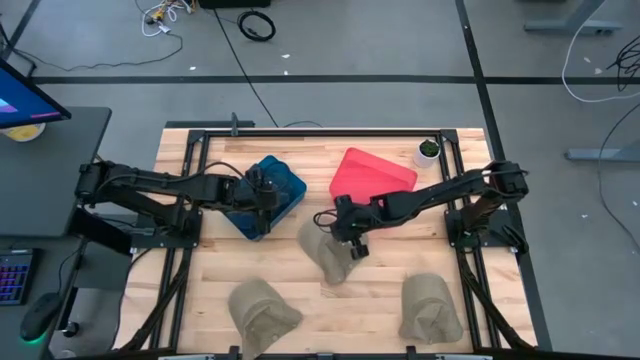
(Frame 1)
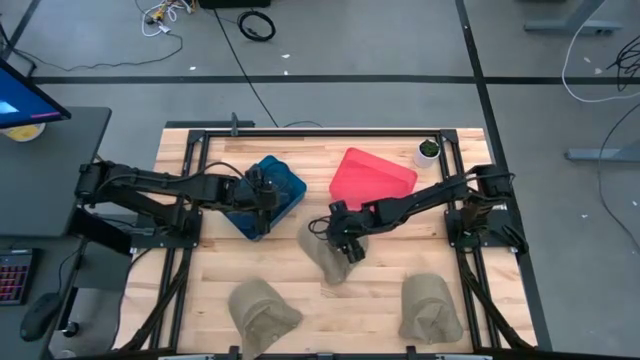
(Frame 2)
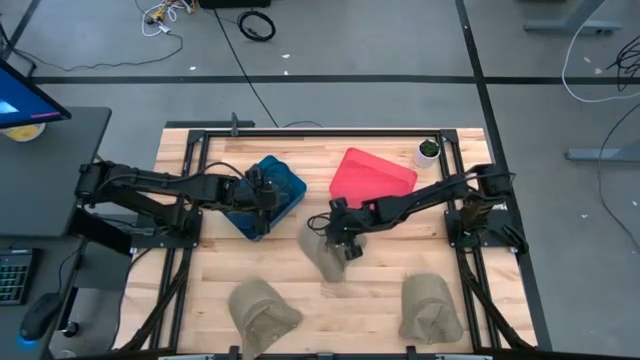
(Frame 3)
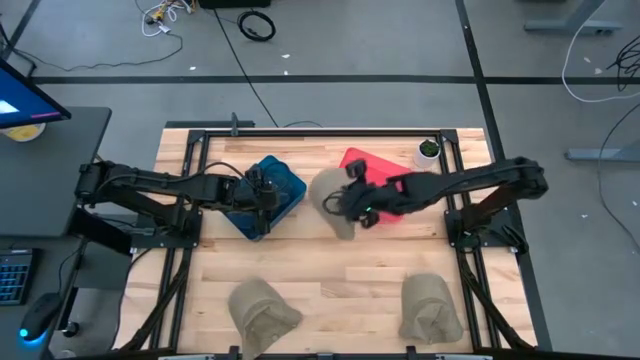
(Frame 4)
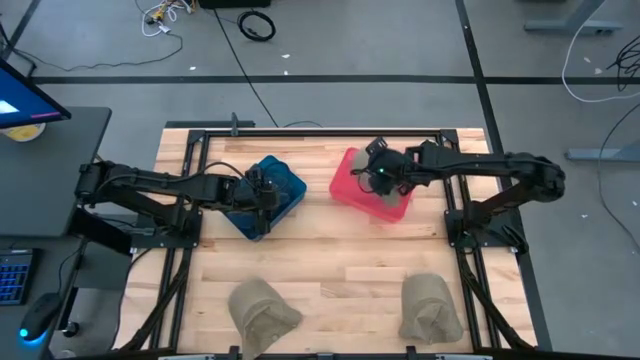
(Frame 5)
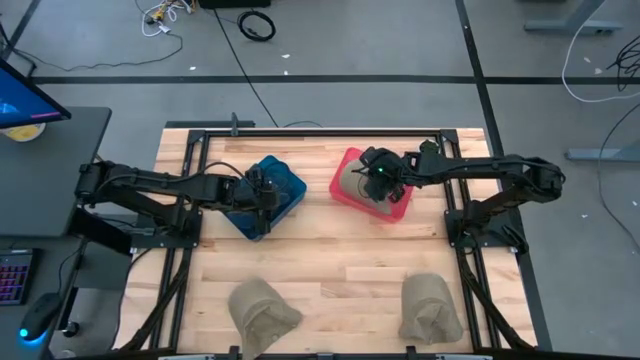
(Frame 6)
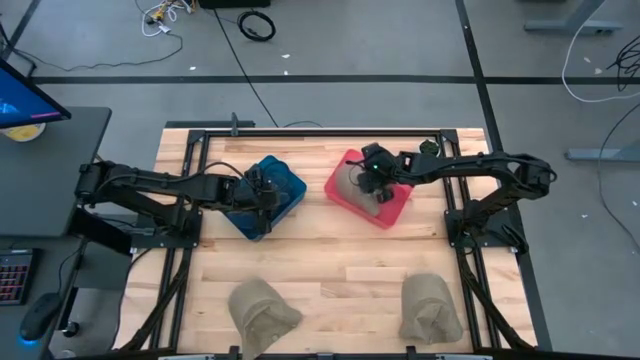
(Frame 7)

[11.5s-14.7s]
Task: Pick & Place hat
Put the top brown cap into the pink bin

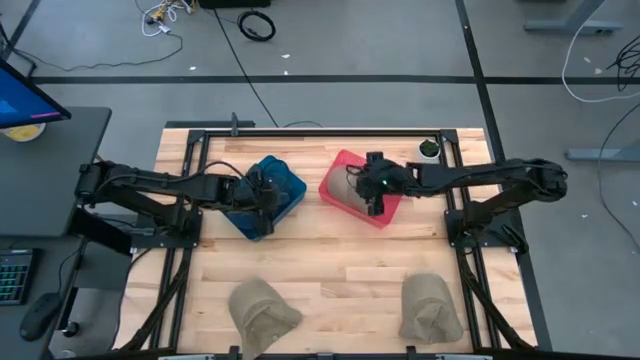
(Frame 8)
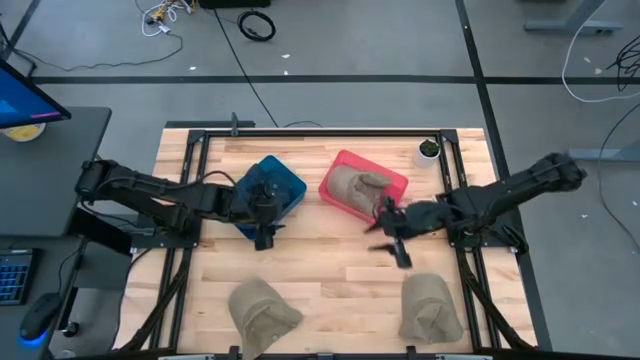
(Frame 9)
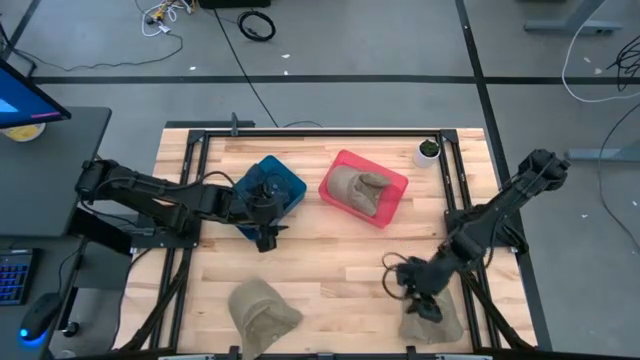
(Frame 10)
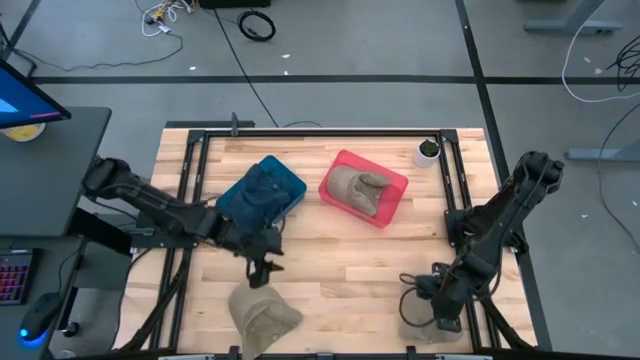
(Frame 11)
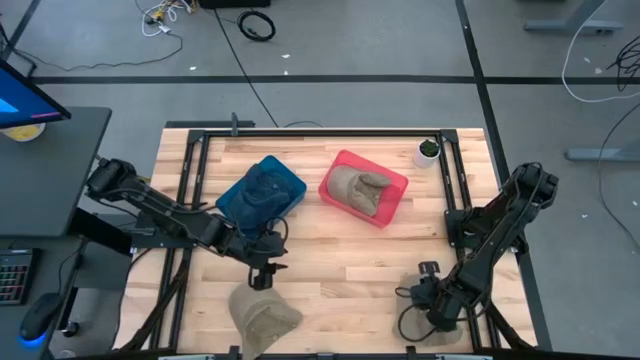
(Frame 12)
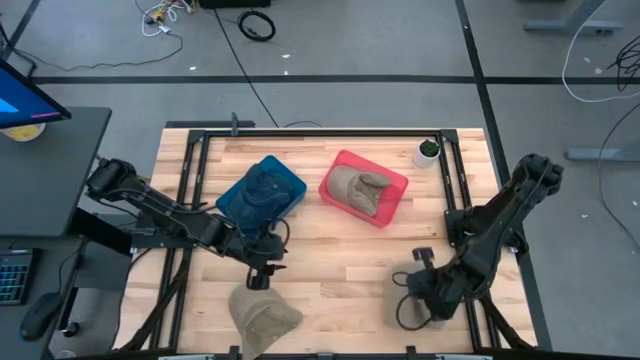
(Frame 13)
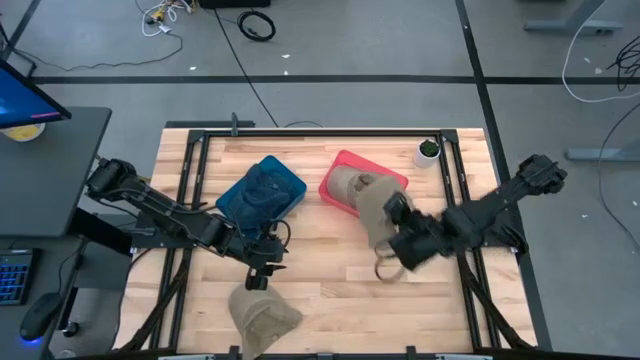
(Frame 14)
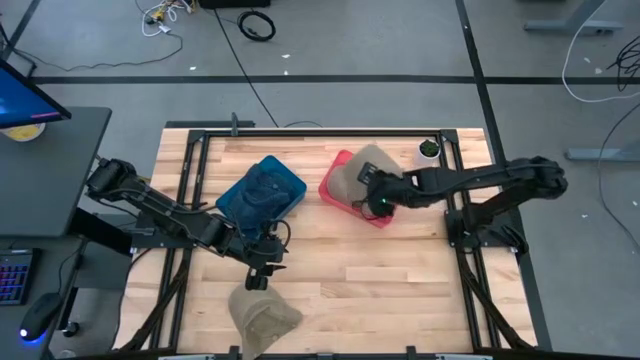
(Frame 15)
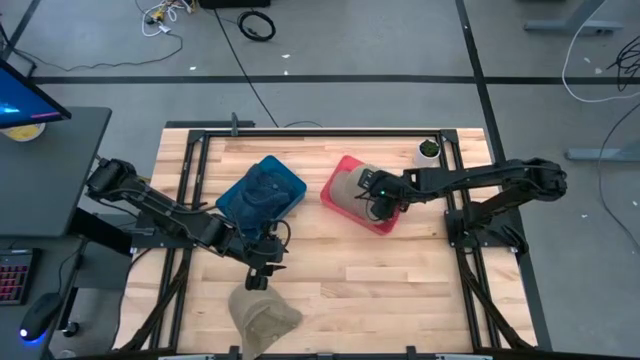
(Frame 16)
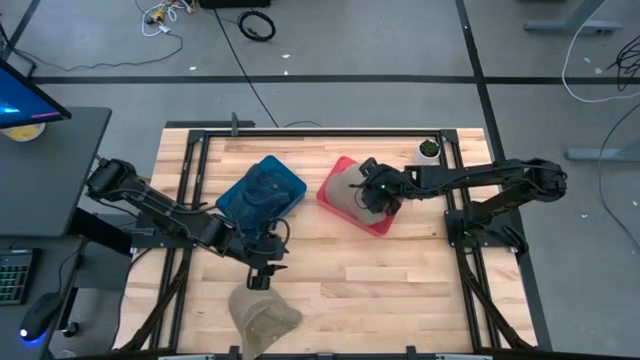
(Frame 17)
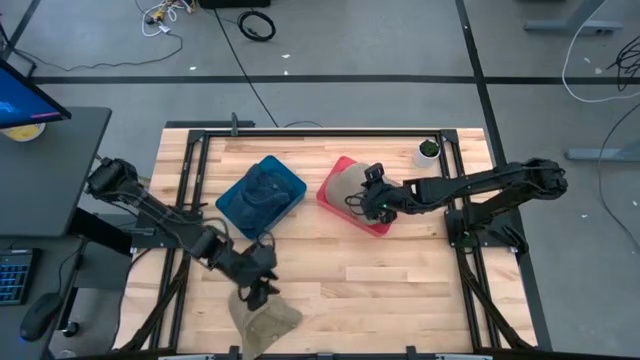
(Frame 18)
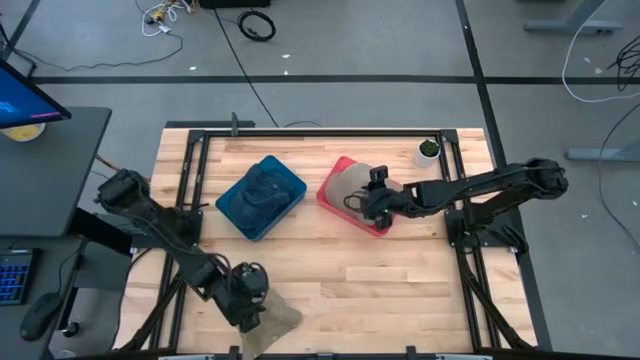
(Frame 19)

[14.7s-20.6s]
Put the right brown cap into the pink bin

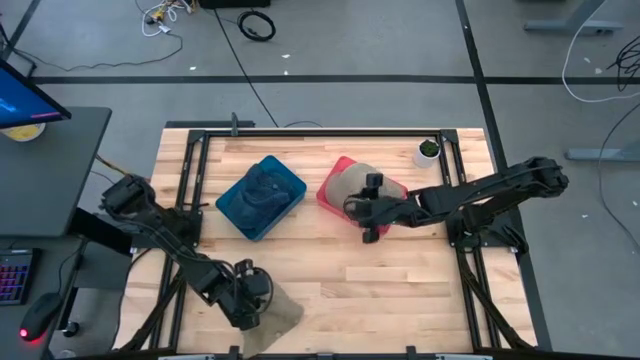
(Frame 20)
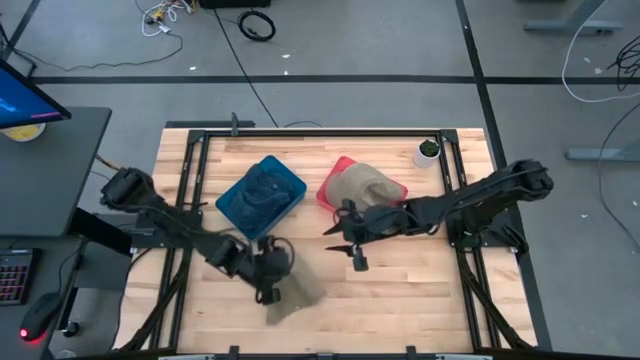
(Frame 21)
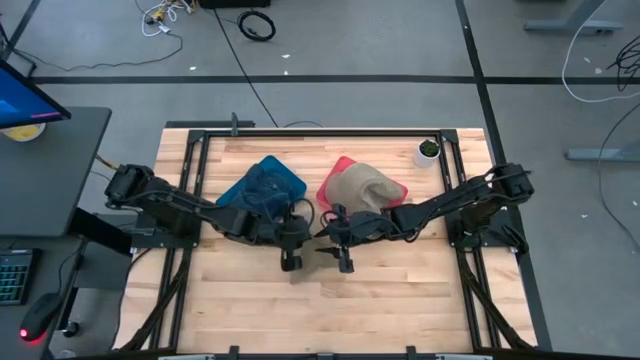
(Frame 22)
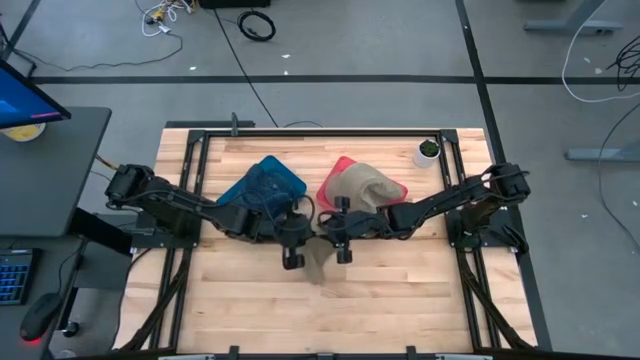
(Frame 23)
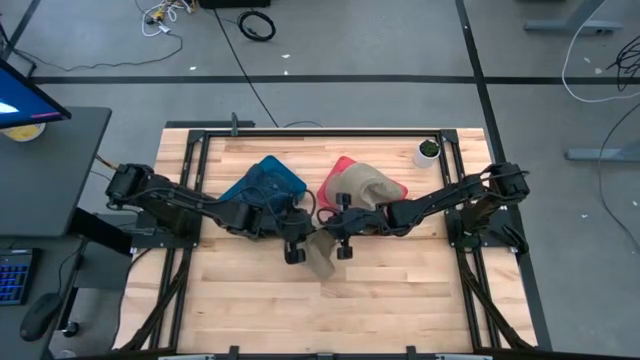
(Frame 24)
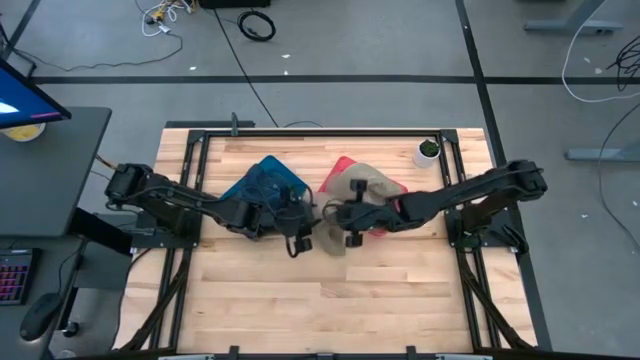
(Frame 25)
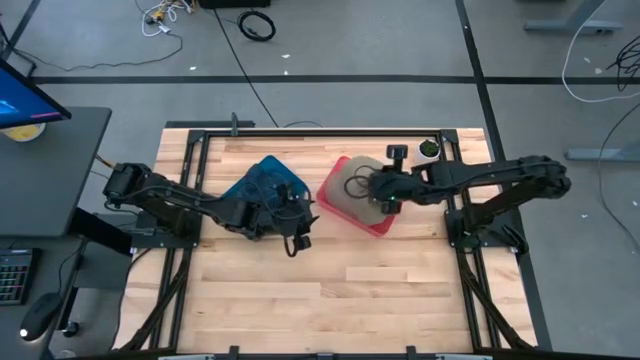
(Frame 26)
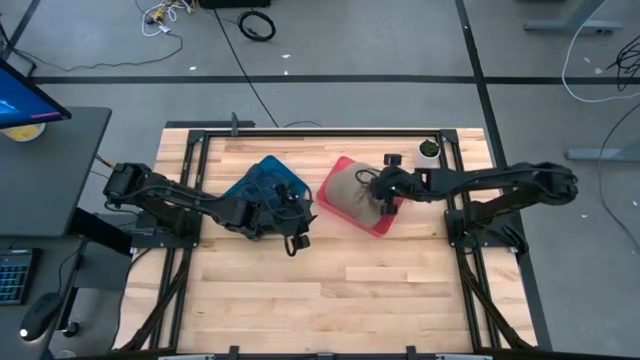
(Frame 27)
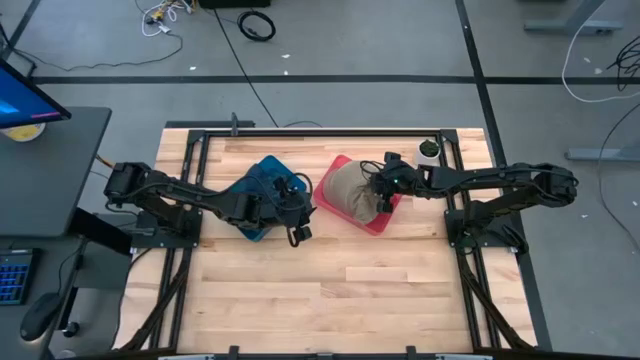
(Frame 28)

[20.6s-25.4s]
Put the brown cap into the pink bin

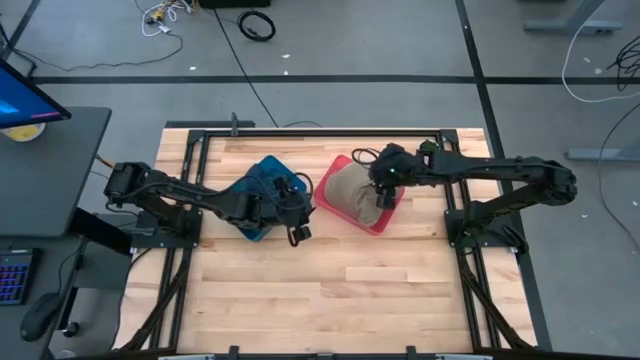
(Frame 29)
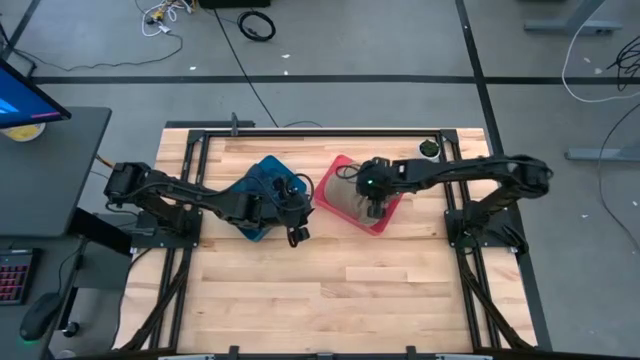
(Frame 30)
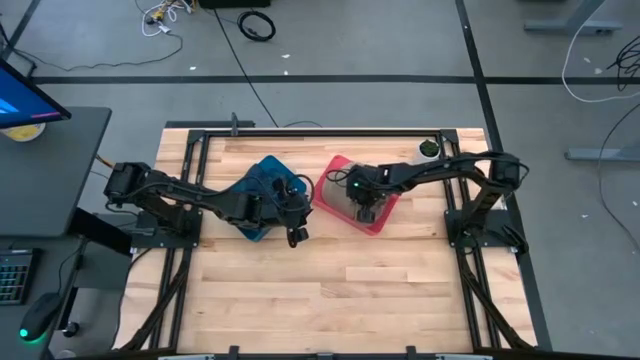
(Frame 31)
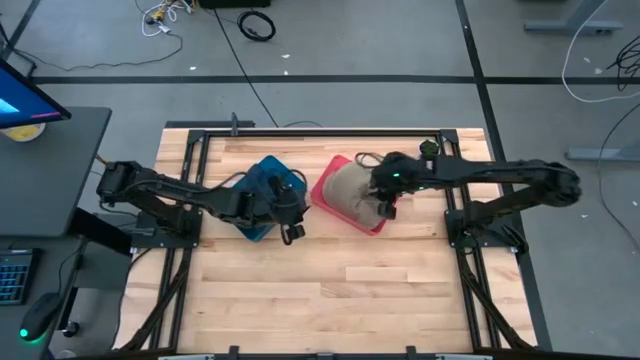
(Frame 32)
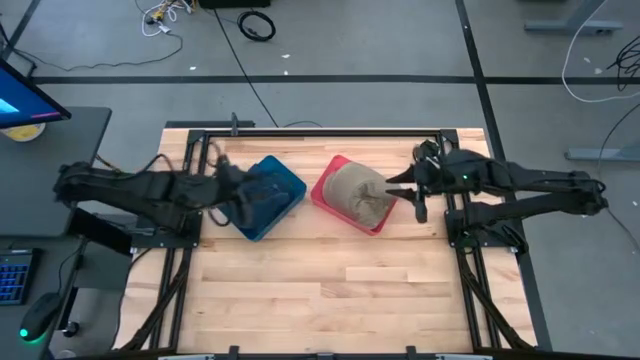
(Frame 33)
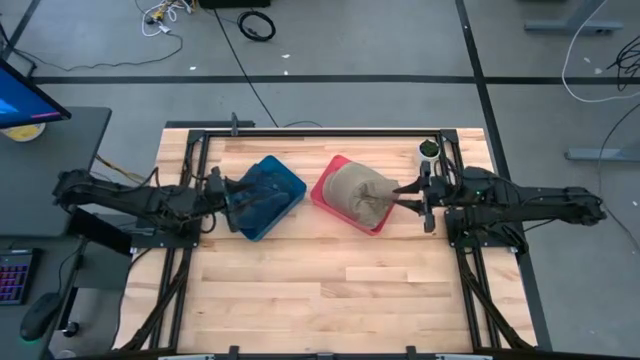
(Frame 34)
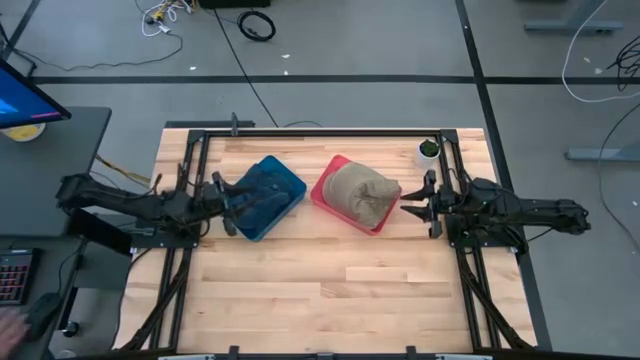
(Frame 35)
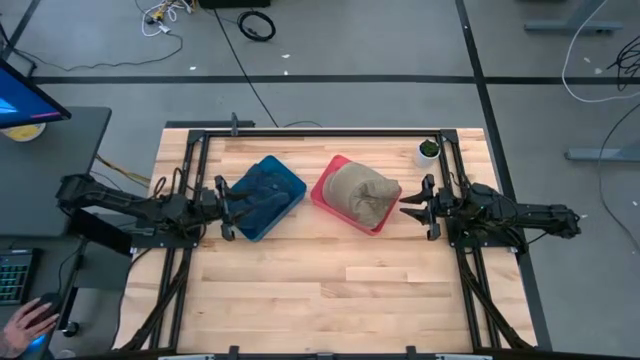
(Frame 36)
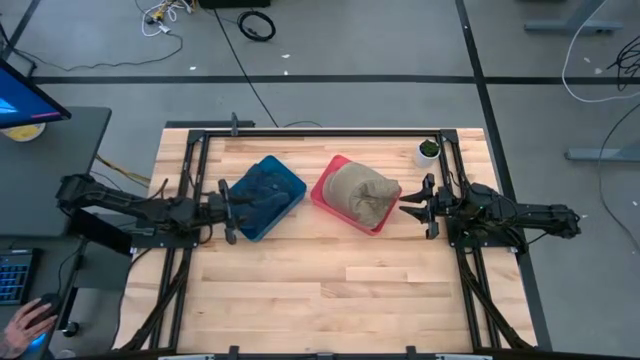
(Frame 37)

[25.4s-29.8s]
Return to Home Position

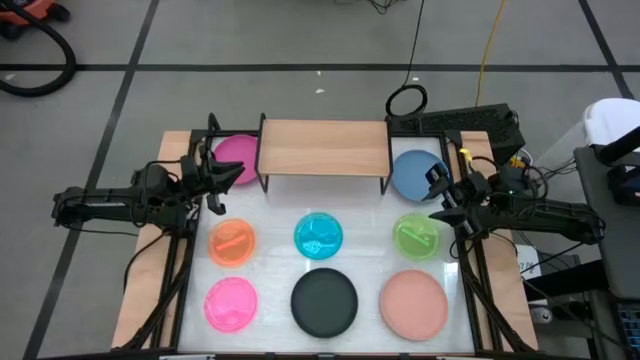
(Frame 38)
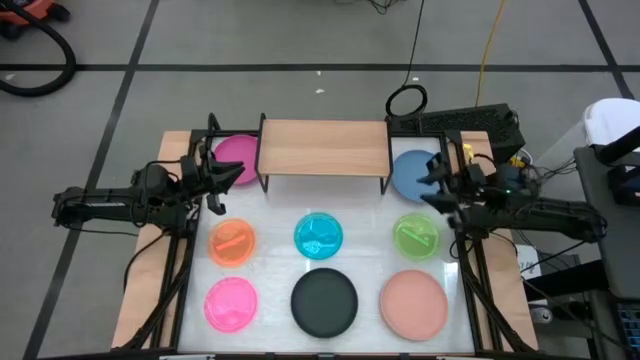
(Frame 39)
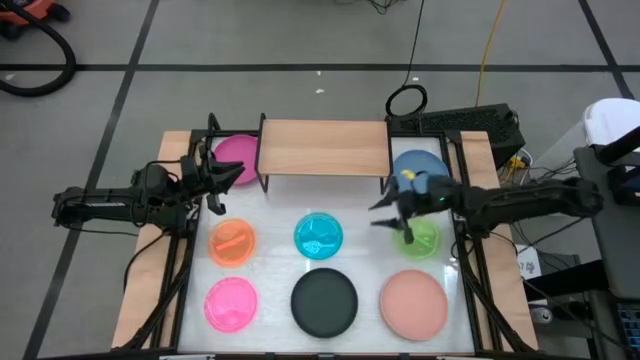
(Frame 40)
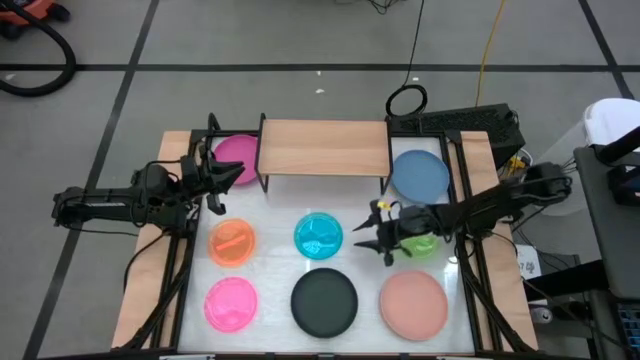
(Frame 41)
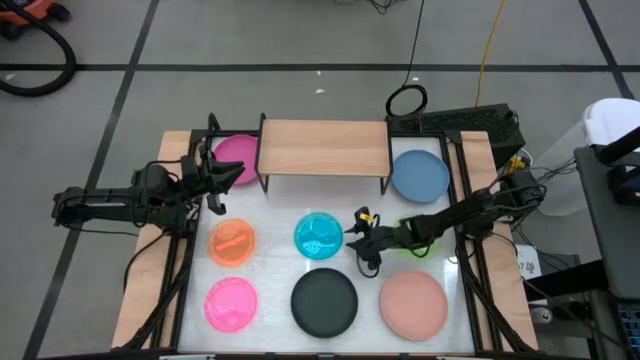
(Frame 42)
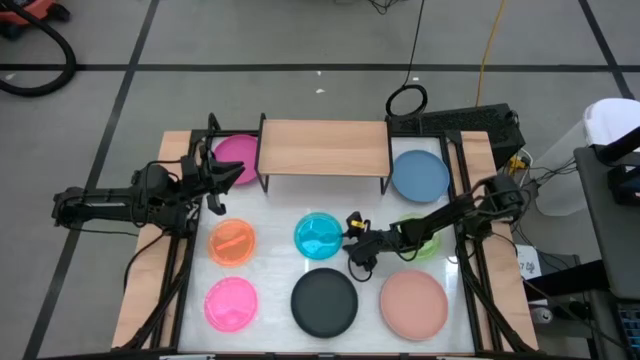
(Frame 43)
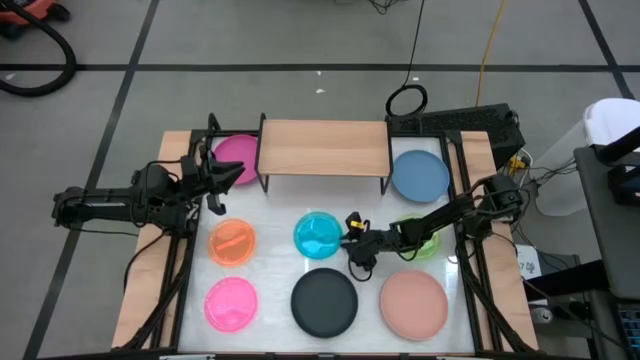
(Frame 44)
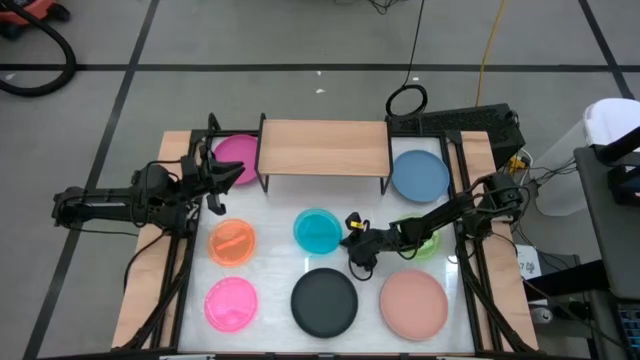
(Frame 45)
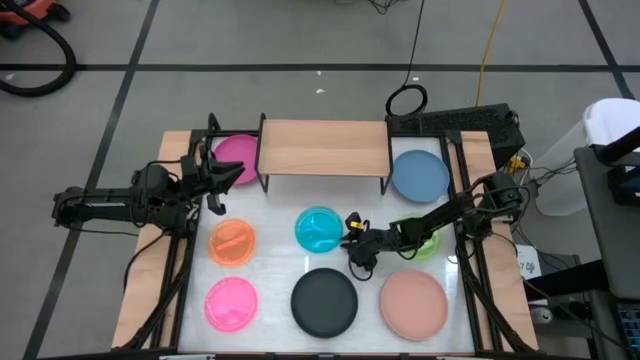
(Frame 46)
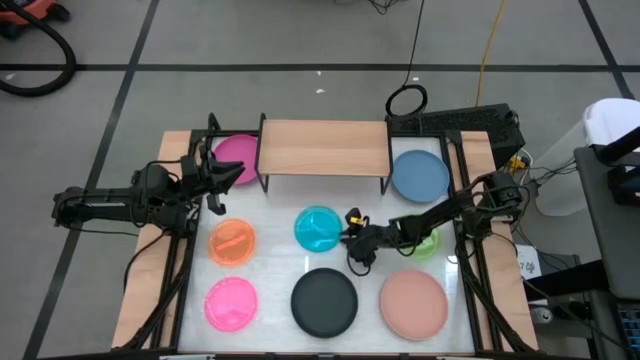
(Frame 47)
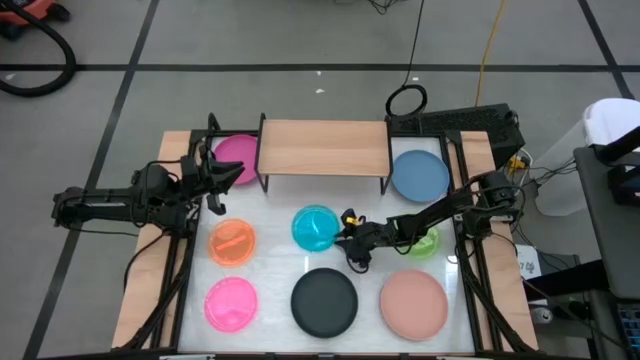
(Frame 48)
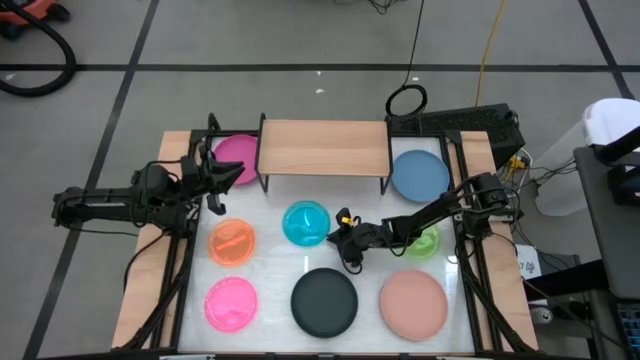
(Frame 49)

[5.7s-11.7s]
Task: Place and stack plates onto a shelf
Put the light blue plate on the shelf
